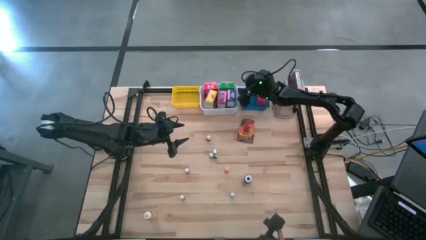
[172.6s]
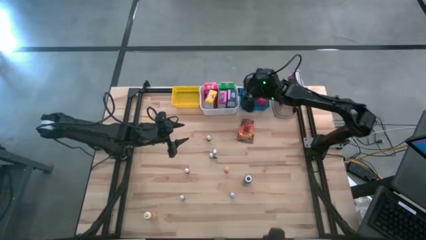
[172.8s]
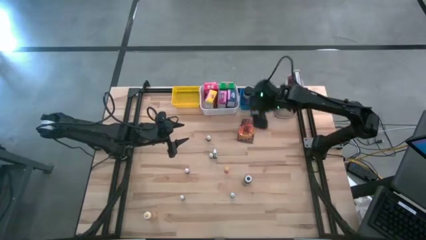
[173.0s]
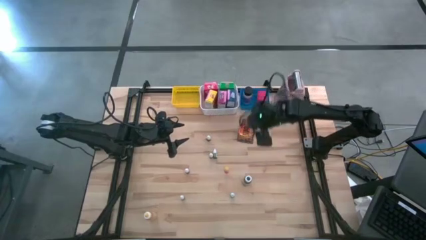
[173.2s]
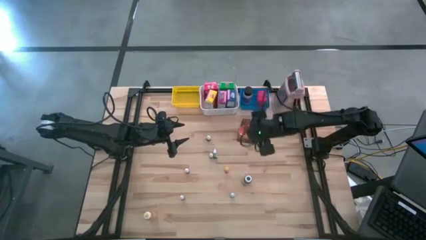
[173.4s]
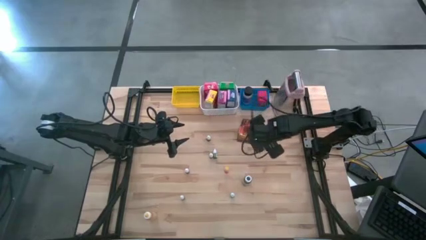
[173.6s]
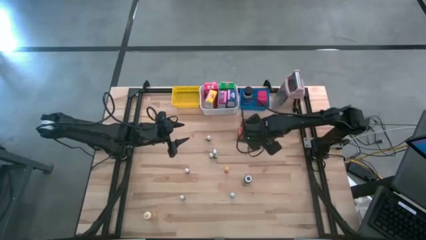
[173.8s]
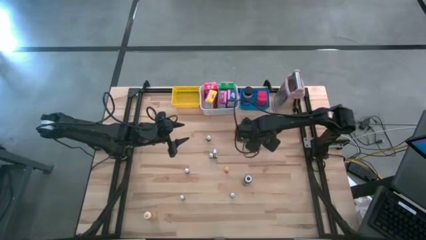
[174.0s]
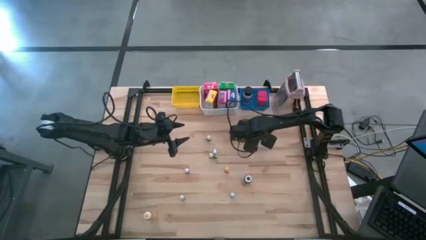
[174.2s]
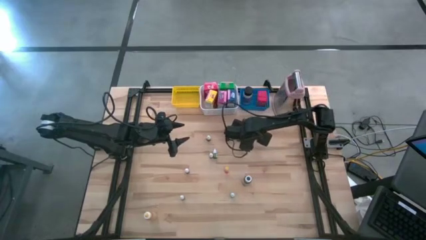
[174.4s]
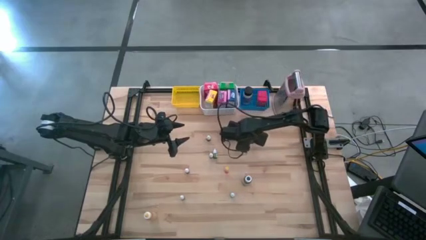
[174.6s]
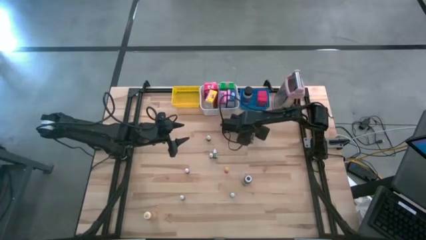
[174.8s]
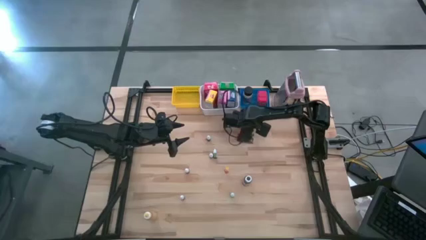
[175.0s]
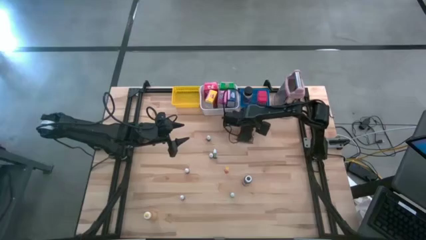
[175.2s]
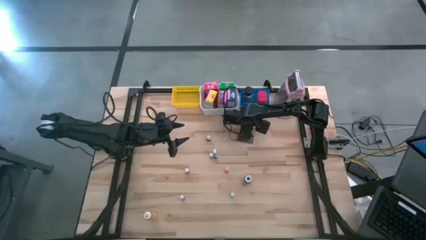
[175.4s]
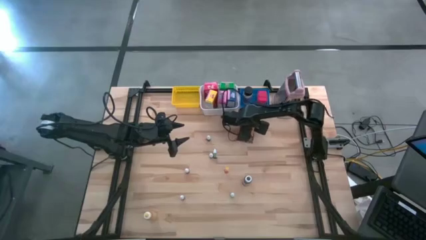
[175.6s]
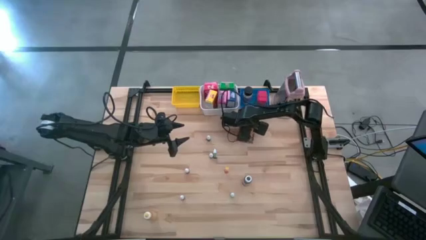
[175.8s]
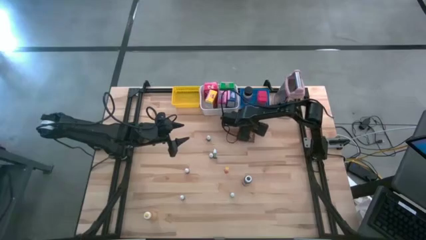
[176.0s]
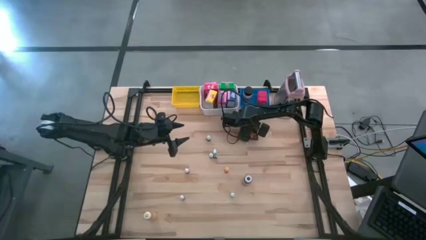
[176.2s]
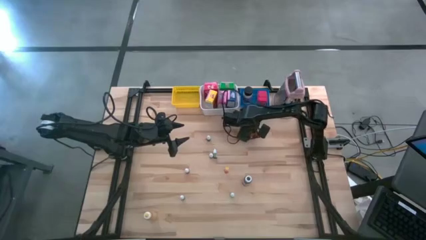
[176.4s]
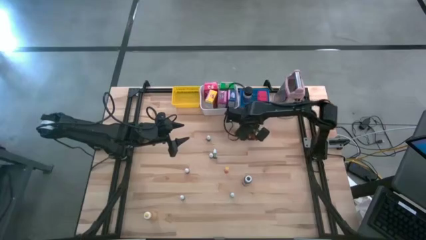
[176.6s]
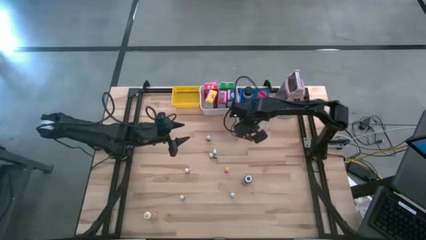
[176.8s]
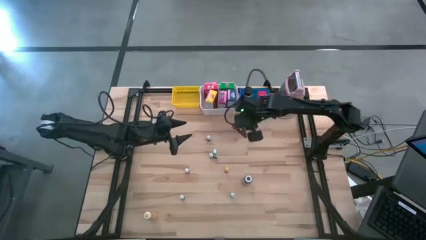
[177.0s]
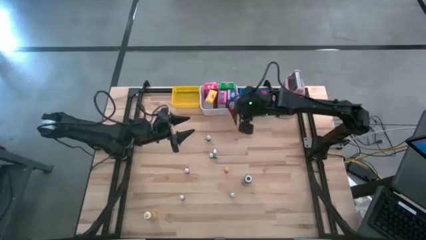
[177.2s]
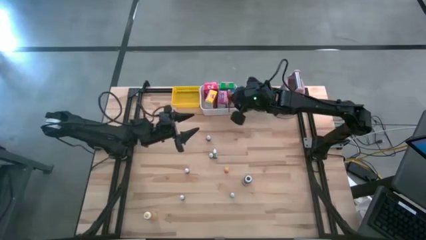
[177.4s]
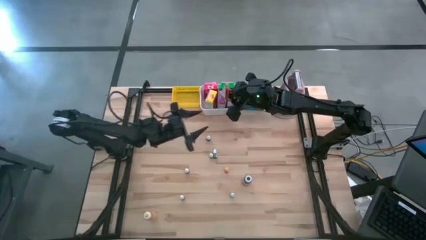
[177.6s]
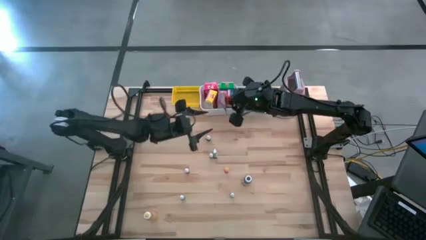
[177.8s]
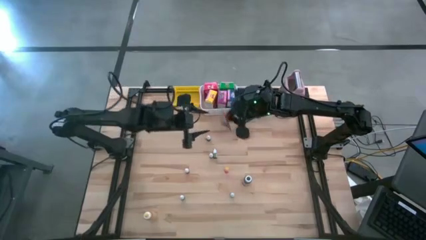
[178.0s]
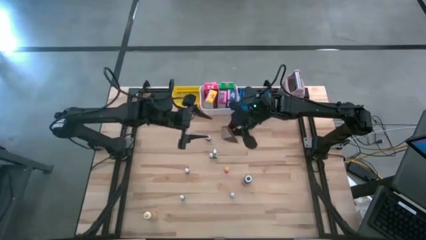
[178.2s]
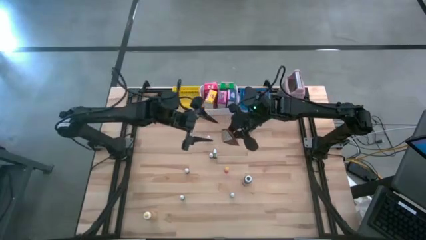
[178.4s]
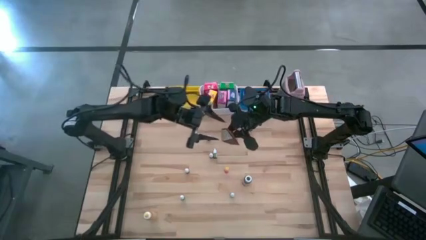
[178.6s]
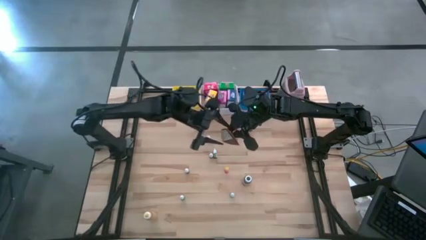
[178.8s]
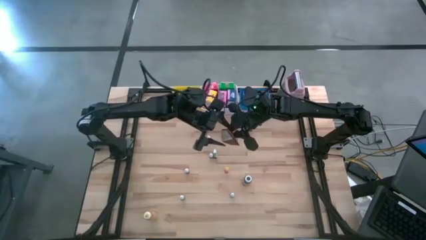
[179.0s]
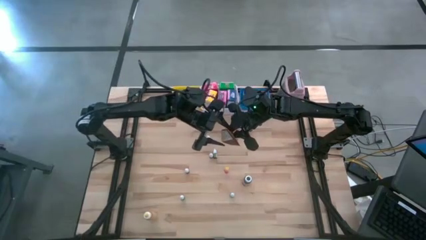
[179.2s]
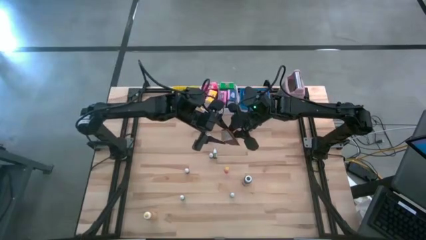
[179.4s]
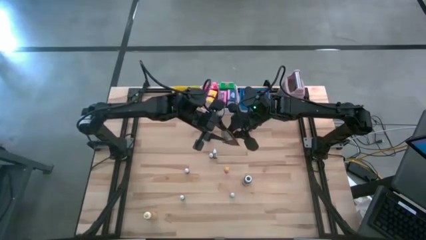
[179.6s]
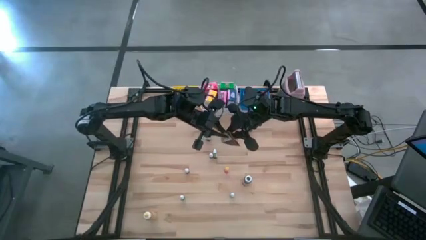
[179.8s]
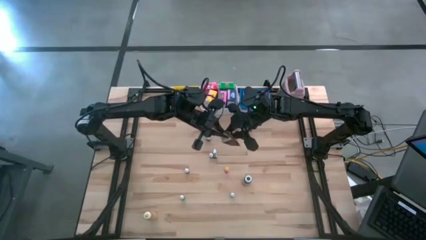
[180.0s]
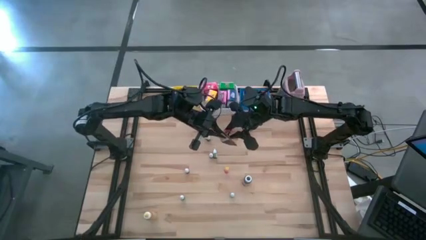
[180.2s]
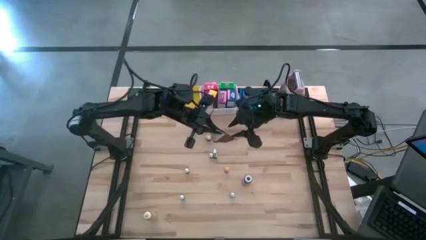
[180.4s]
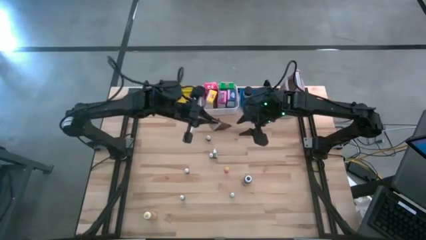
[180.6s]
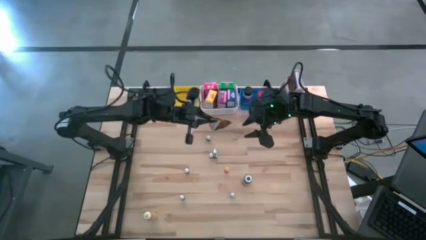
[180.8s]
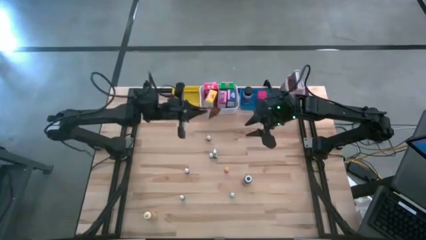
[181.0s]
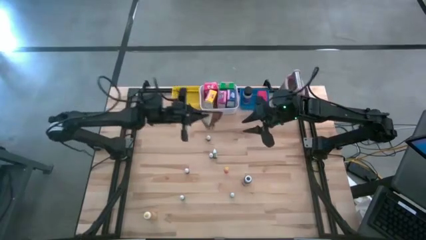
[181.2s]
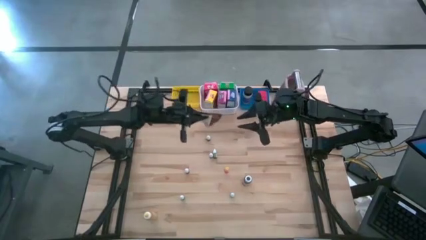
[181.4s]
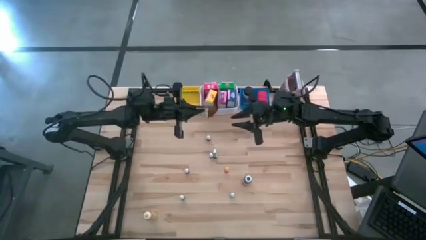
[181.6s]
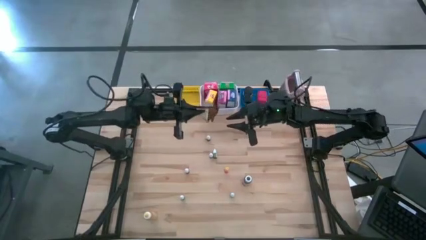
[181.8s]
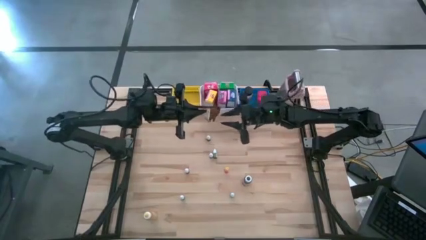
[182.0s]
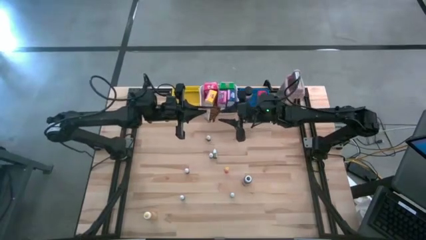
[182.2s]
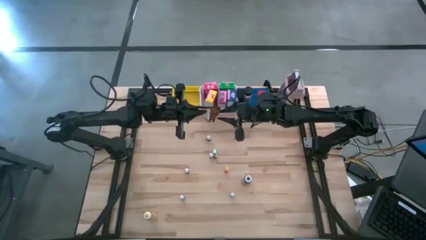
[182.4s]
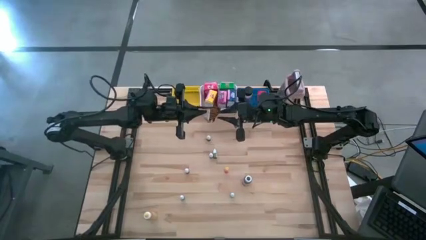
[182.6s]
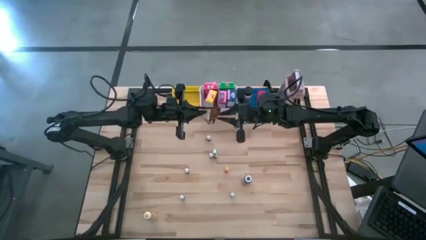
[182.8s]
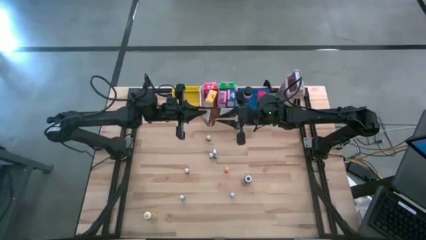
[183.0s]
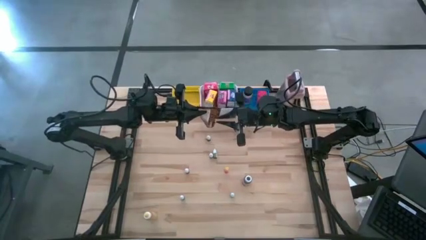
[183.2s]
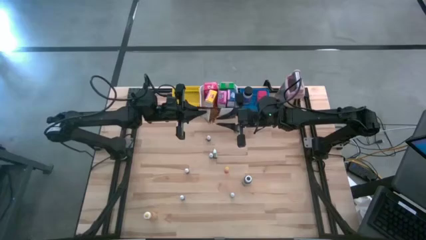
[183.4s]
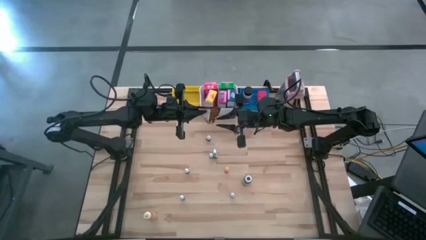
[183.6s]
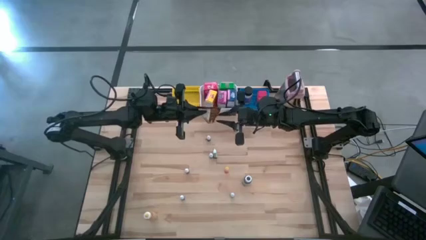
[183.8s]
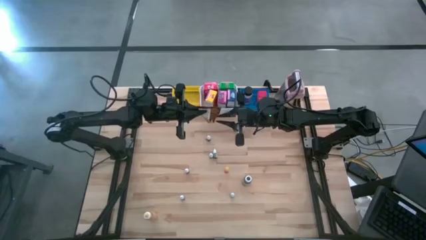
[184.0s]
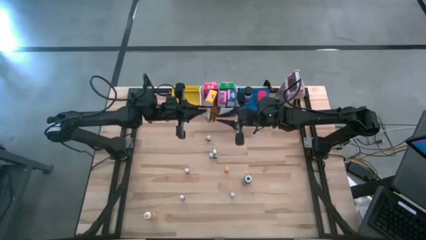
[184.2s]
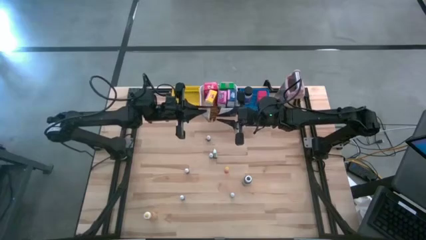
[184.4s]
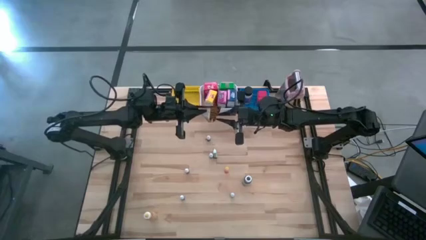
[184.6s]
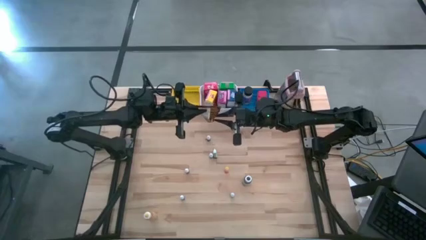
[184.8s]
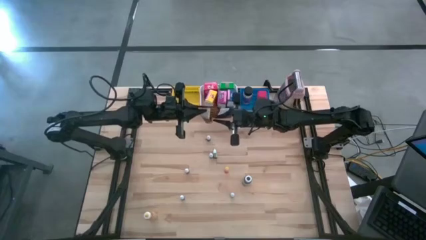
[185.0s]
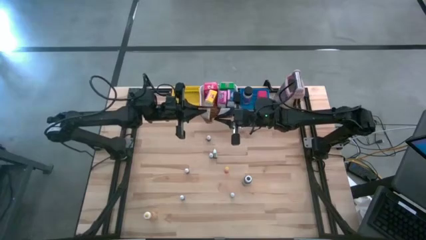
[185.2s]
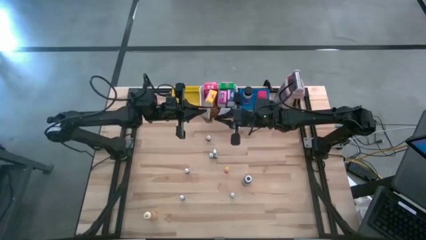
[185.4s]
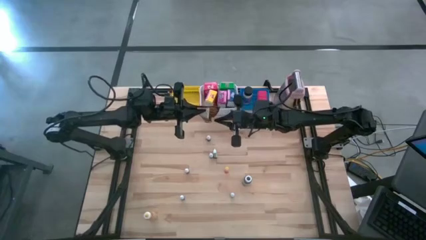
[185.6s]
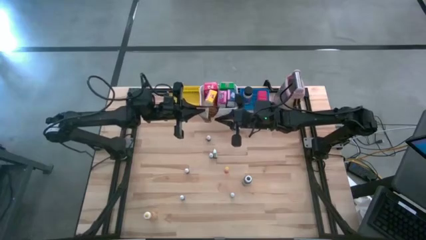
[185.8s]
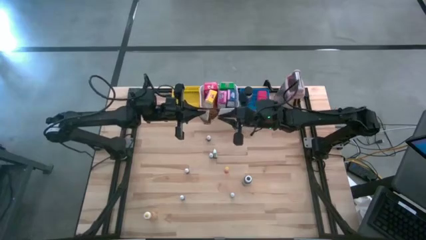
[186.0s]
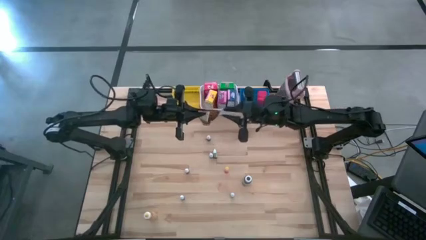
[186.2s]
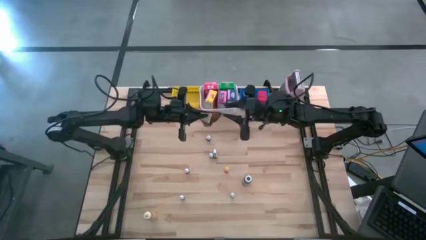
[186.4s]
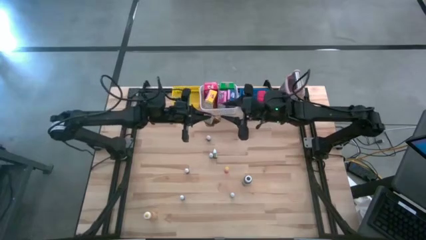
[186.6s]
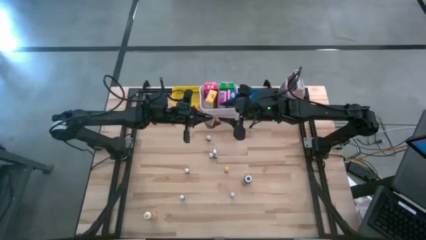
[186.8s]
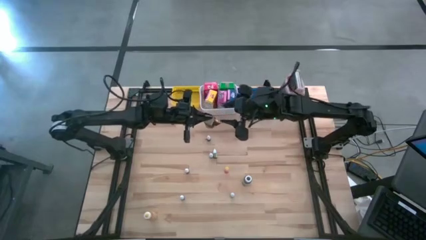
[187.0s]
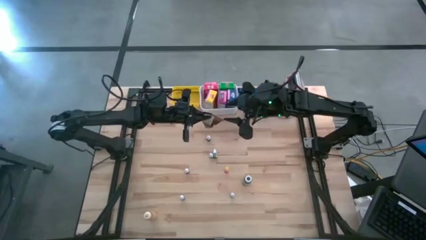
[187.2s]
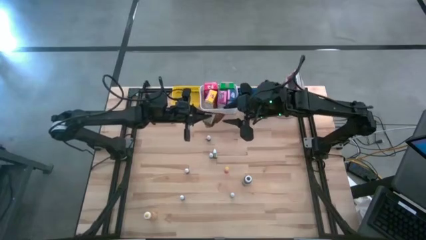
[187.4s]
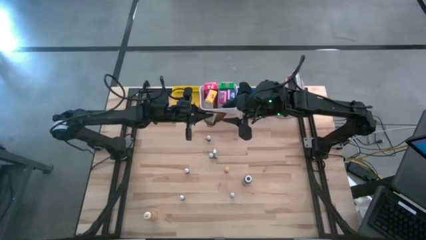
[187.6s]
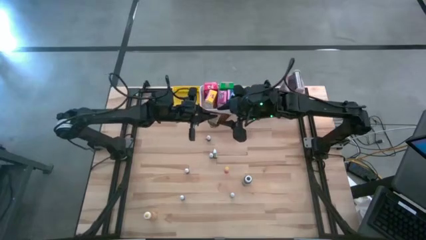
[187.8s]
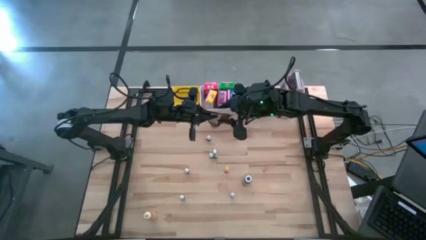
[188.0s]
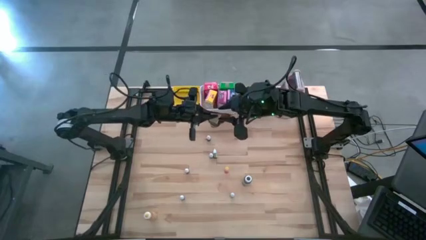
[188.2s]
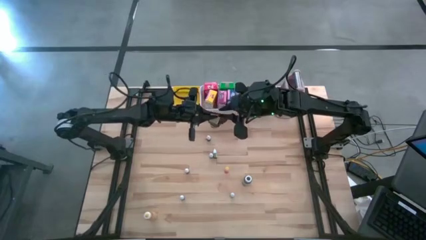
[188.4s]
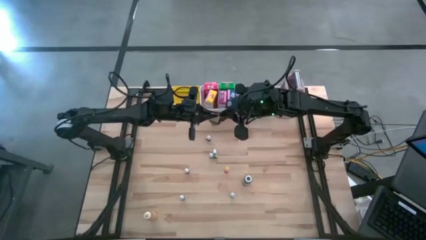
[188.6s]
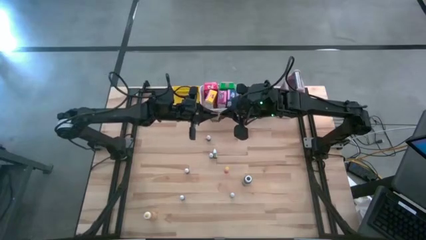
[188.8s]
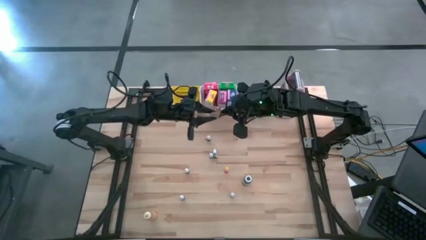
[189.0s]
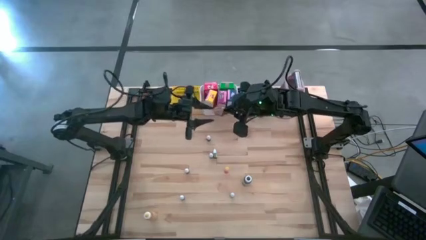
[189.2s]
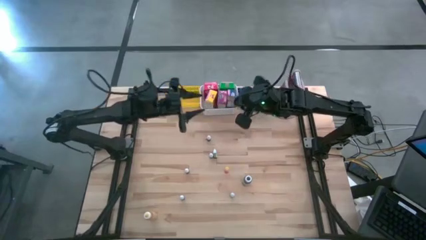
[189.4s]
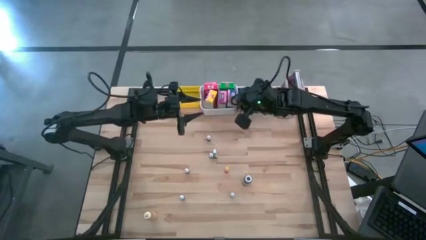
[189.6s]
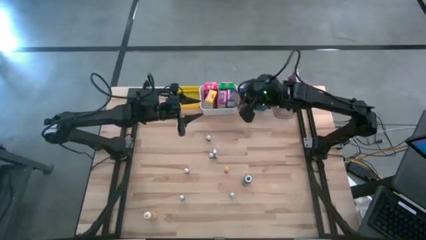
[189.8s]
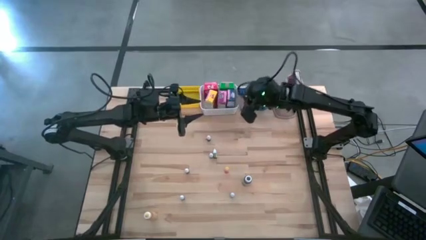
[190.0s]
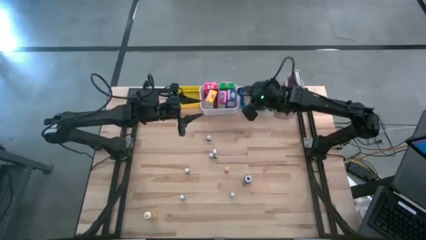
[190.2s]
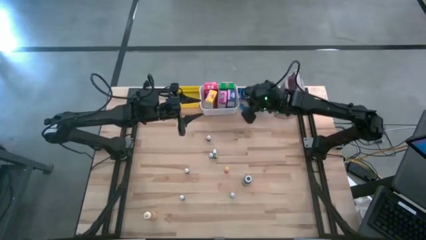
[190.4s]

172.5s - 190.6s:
Task: Pick & Place Kitchen Items
Put the orange seasoning pack into the blue basket
